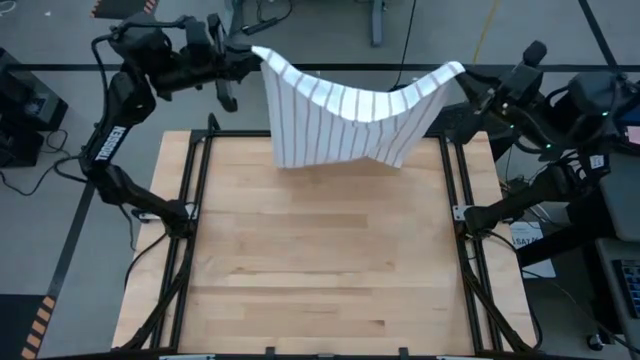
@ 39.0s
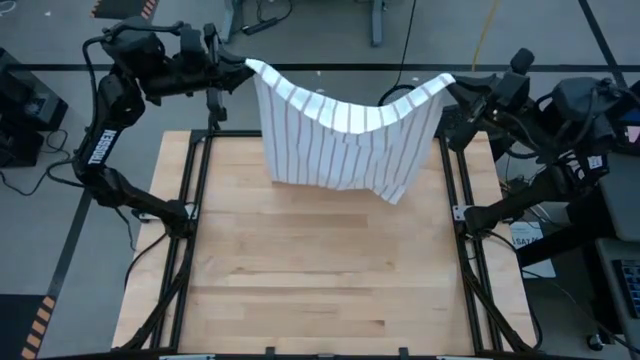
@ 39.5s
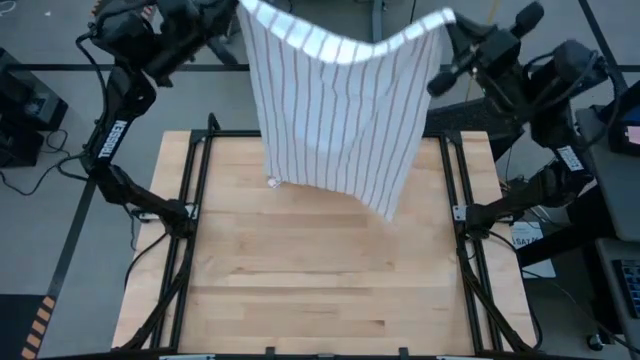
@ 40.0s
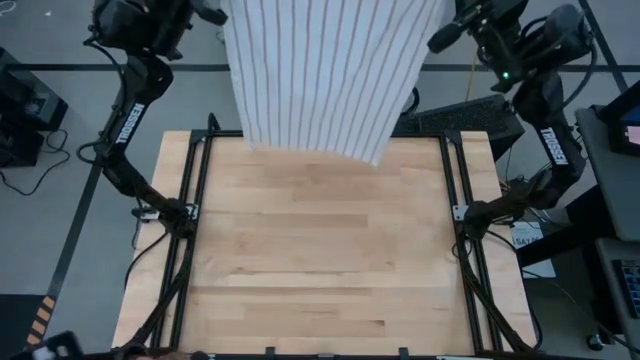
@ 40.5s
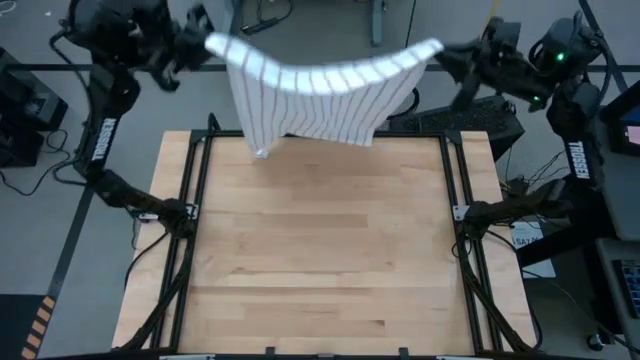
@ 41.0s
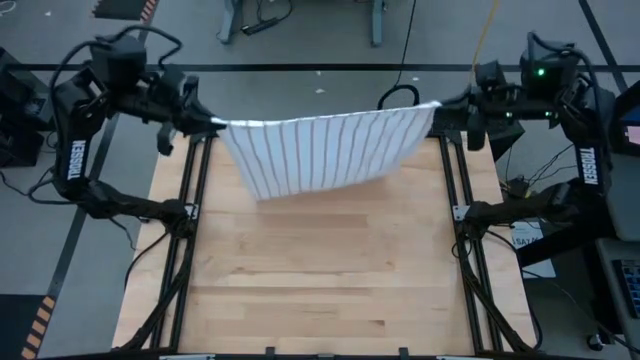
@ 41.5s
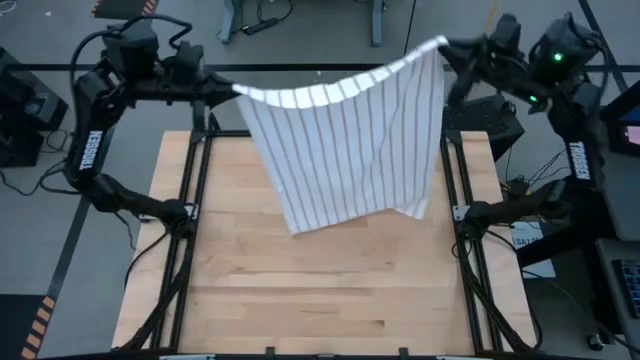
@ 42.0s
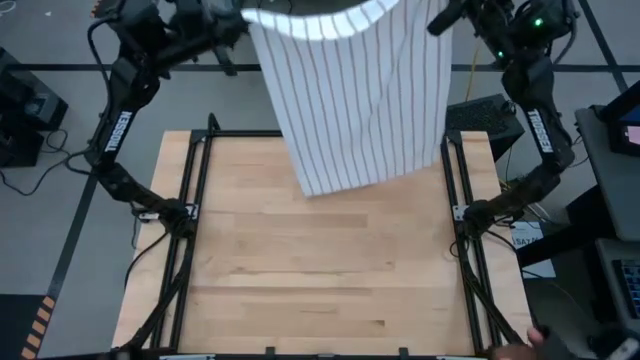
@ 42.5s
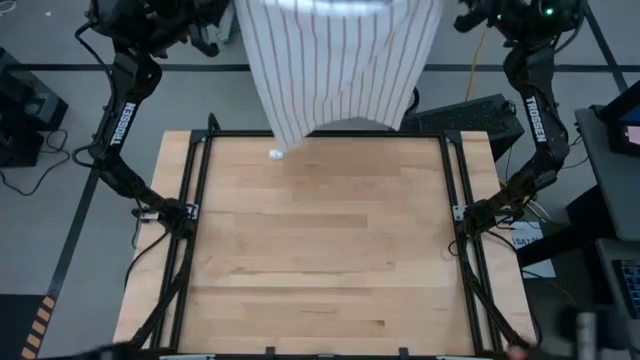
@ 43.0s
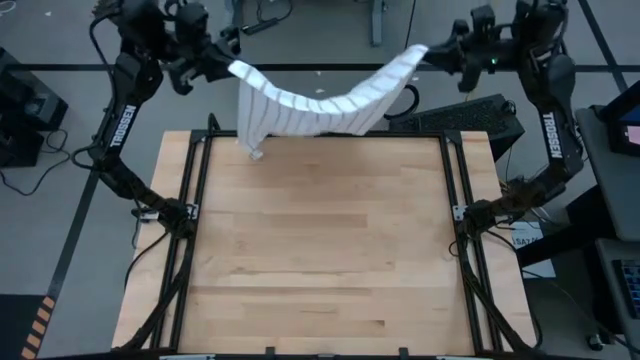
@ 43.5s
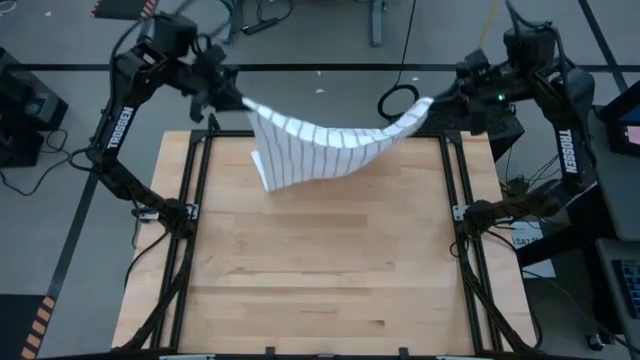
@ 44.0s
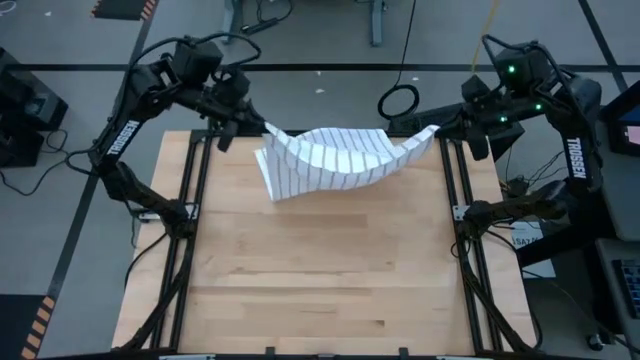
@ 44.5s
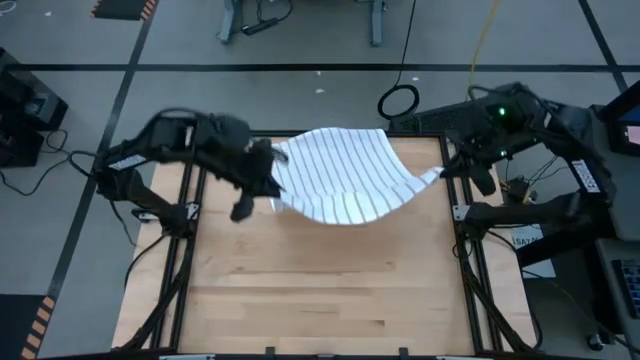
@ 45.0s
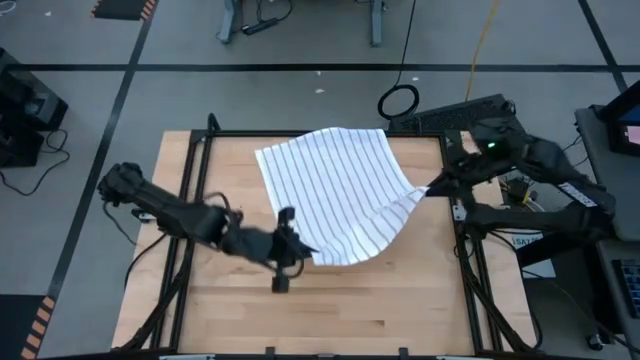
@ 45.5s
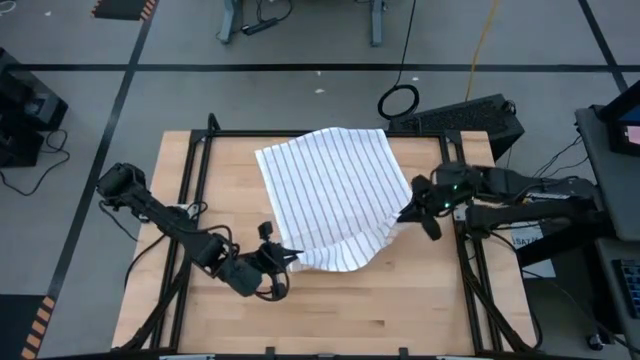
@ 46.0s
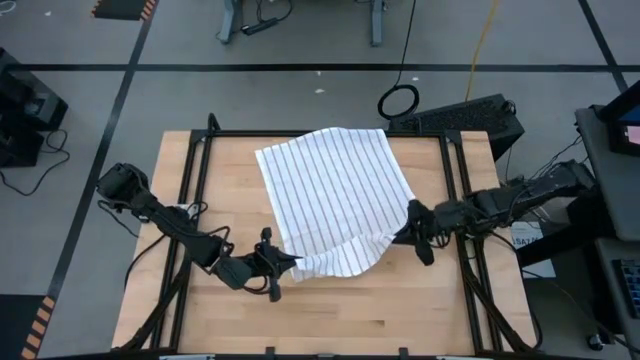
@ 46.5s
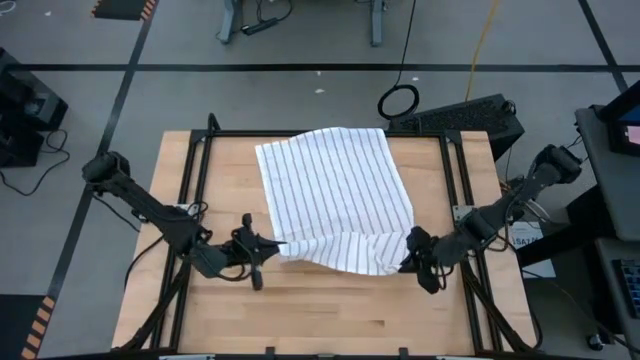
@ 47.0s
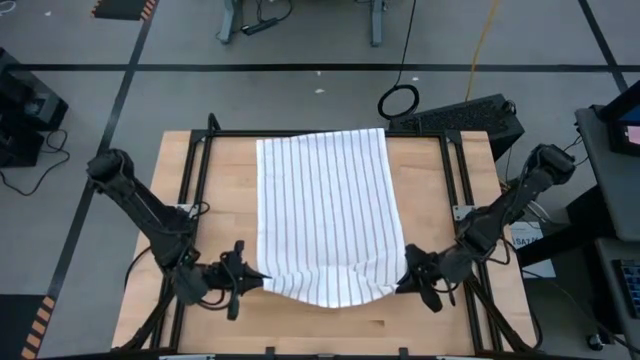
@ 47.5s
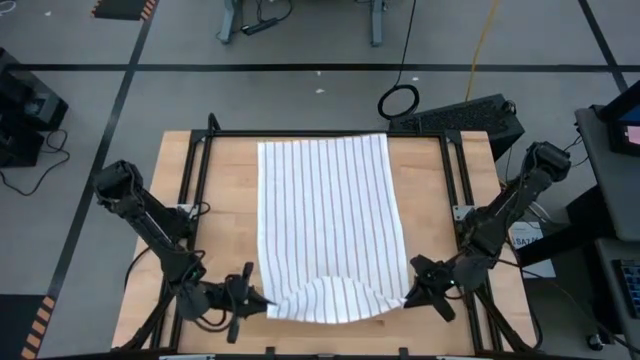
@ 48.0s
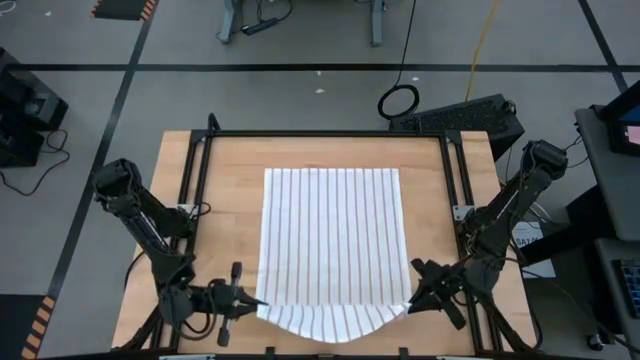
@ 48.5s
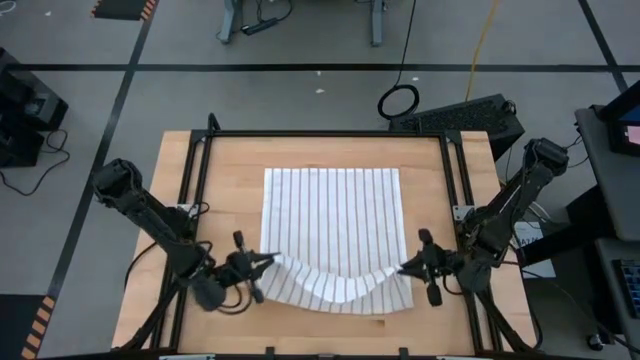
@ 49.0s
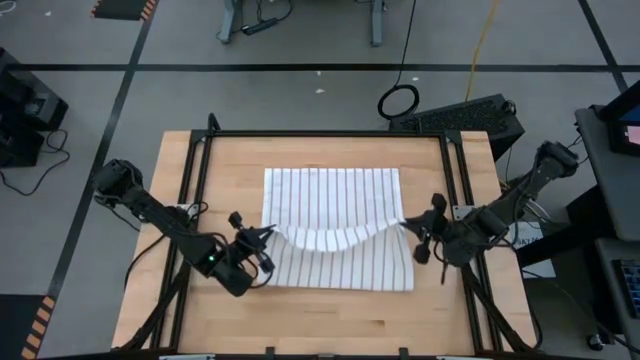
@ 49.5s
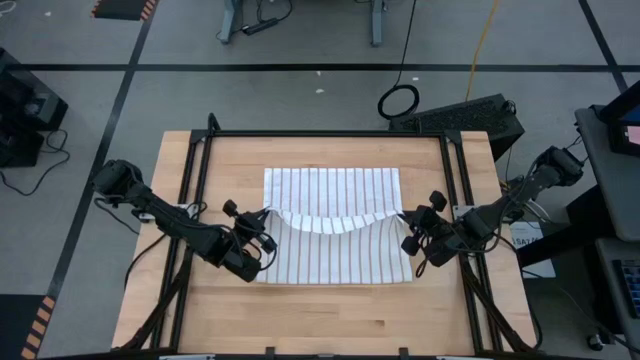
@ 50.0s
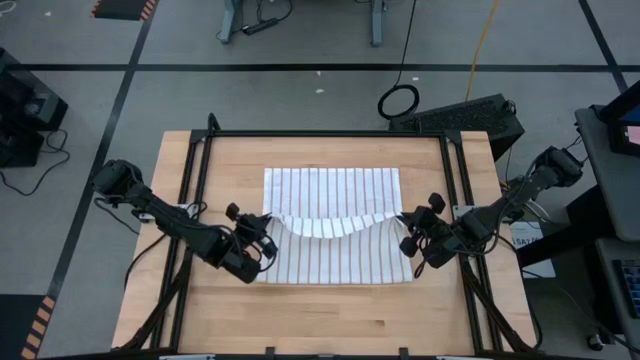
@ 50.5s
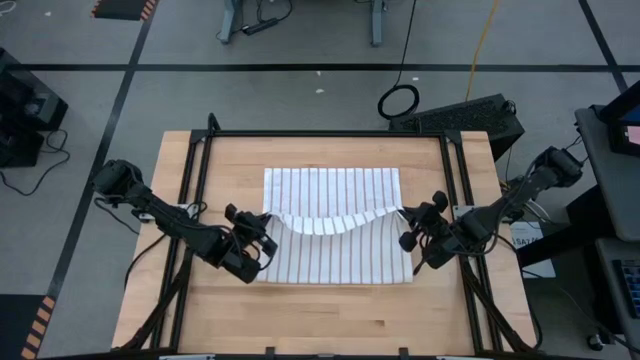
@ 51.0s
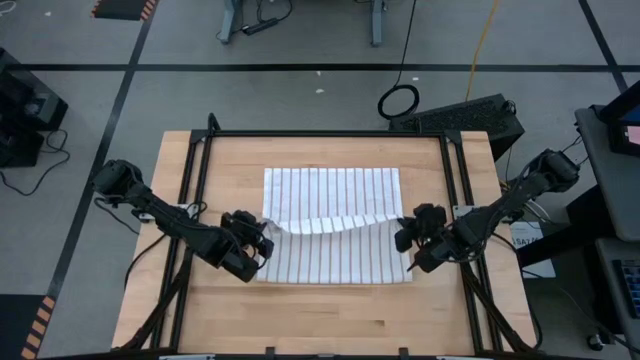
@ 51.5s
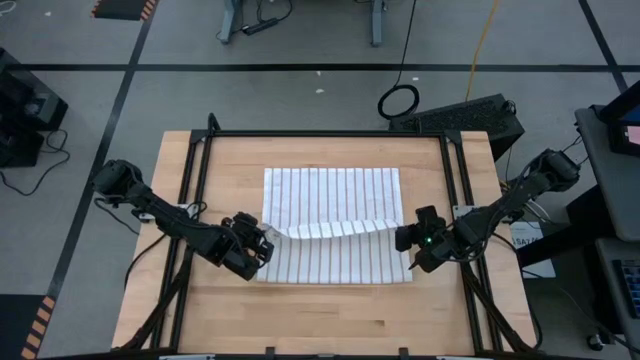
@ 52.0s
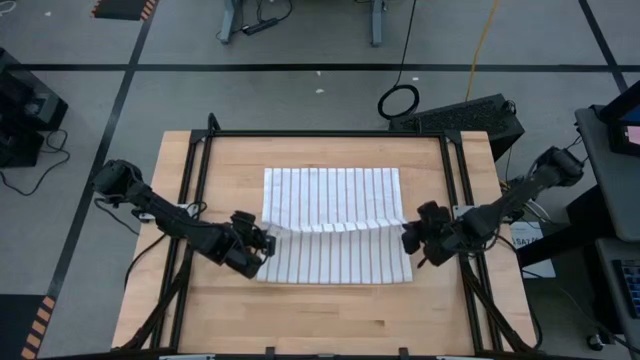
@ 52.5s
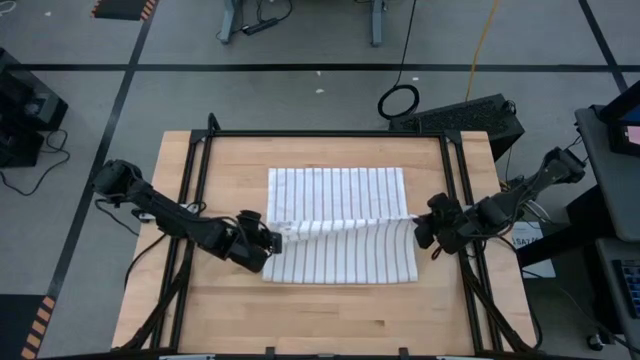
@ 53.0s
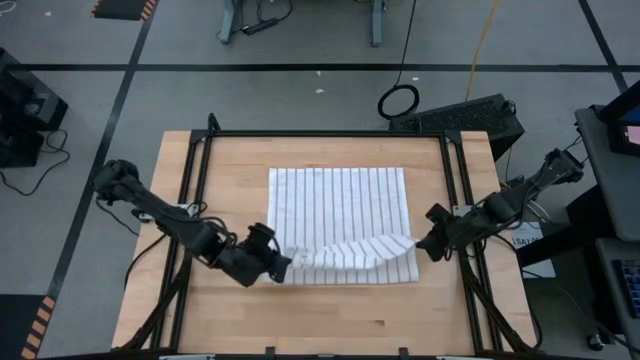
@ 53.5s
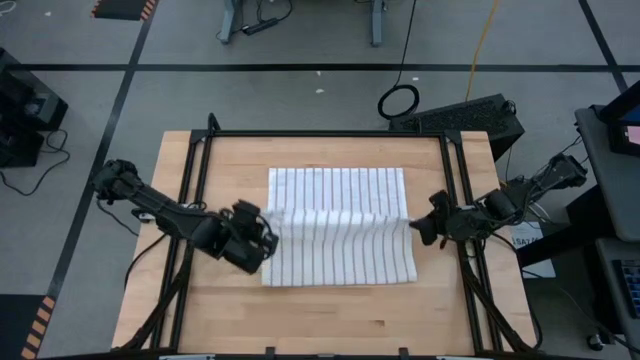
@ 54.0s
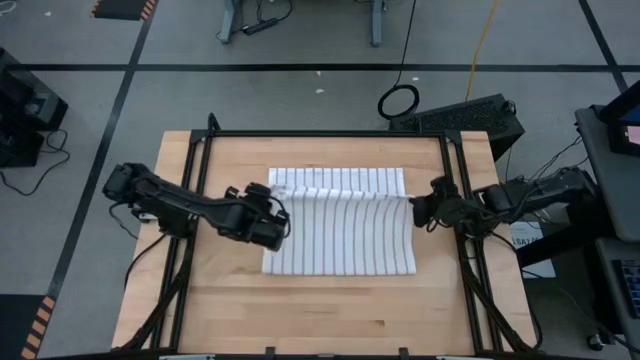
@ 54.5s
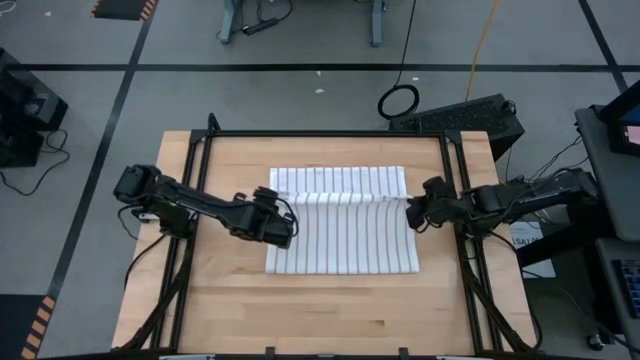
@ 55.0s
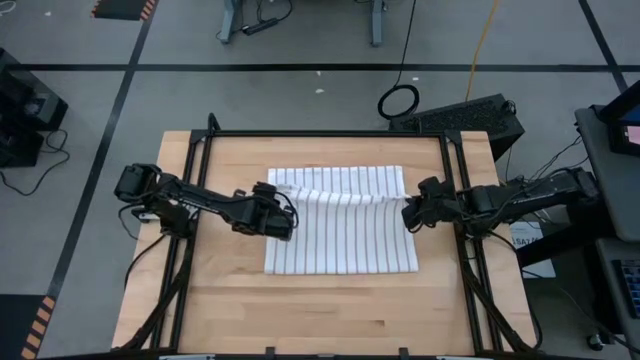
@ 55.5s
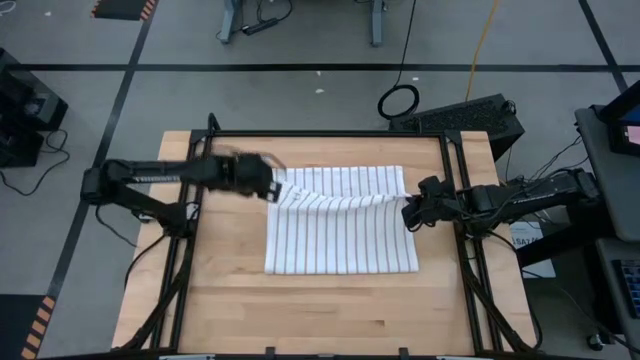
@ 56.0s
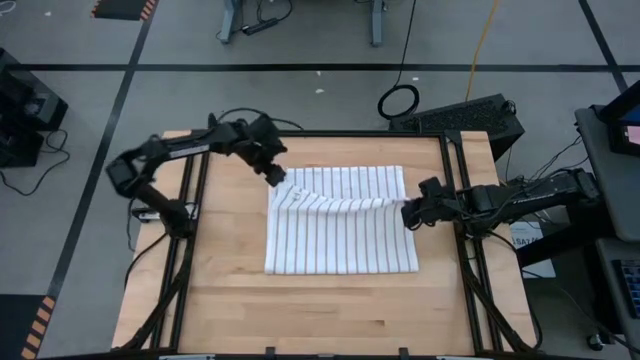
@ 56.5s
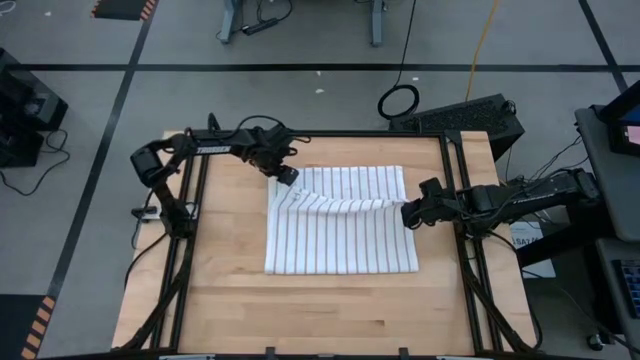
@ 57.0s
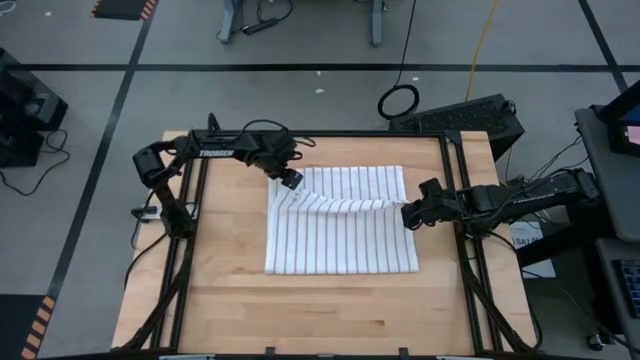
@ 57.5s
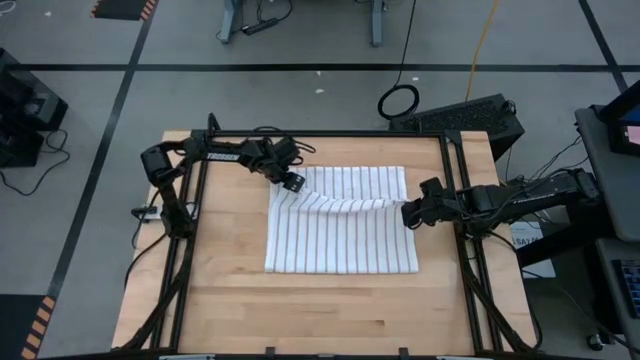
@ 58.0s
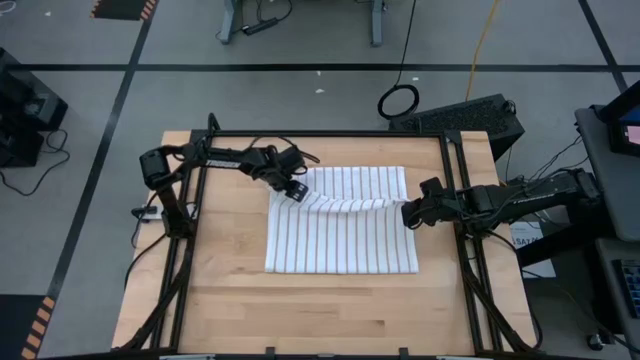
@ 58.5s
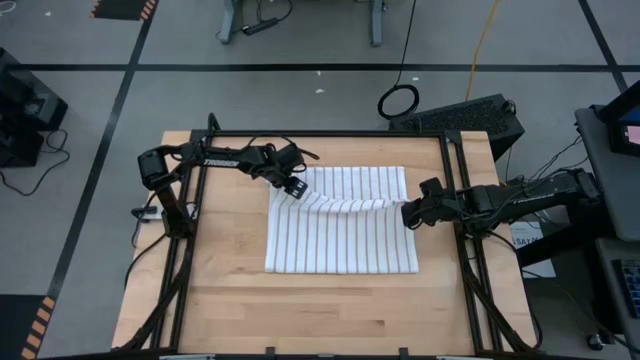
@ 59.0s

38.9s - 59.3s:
Task: Roll towel
Roll the white towel

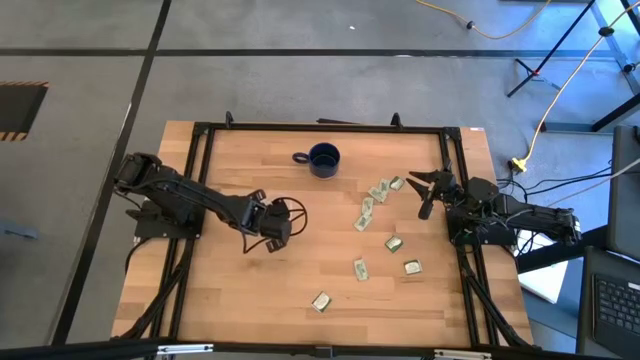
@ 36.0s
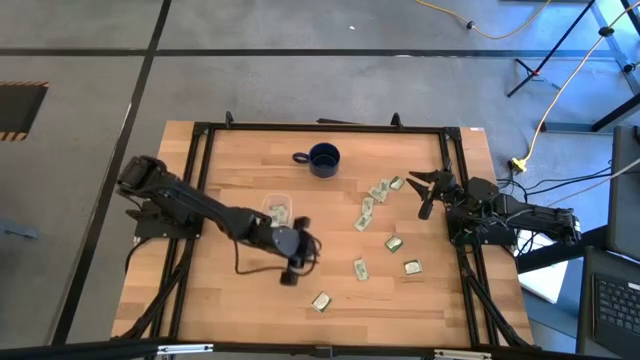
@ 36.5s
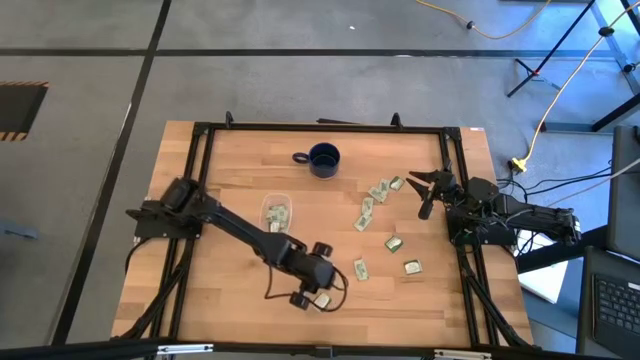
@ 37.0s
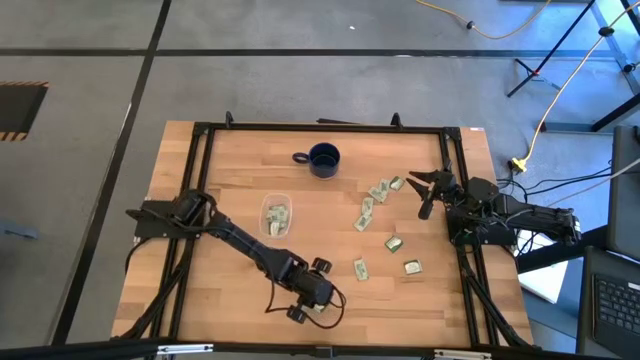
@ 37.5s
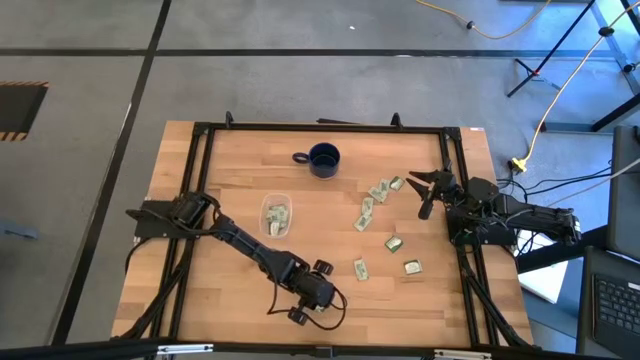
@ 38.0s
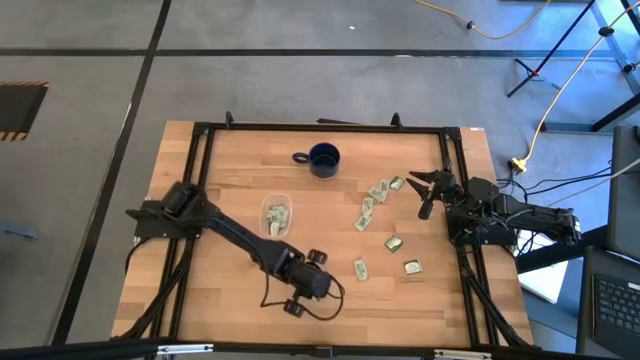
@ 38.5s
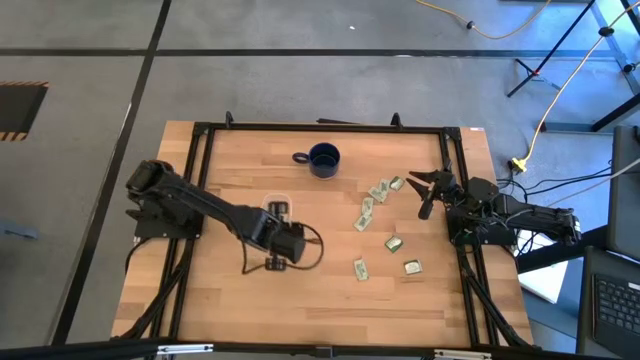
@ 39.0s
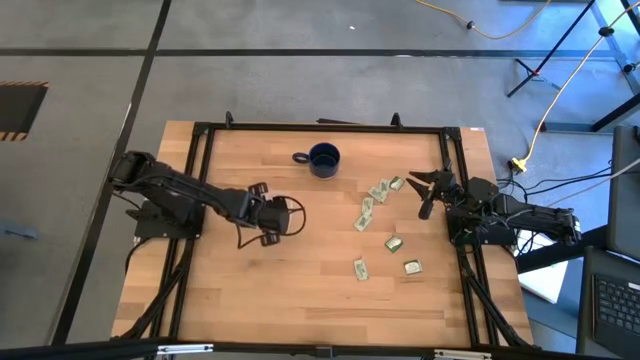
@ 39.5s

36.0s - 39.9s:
Task: Pick and place Stevia / Truvia into bins
Put the green stevia packet into the transparent container
